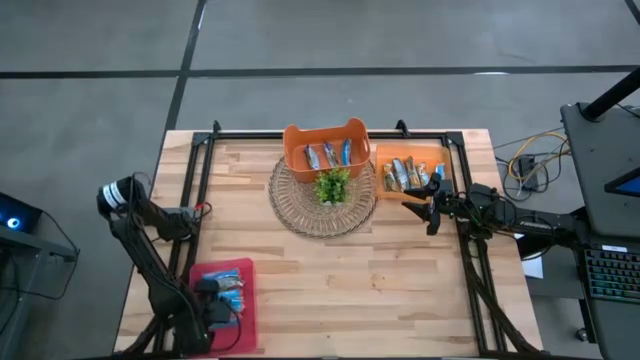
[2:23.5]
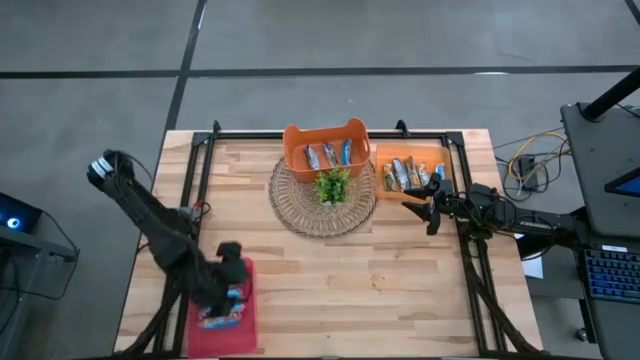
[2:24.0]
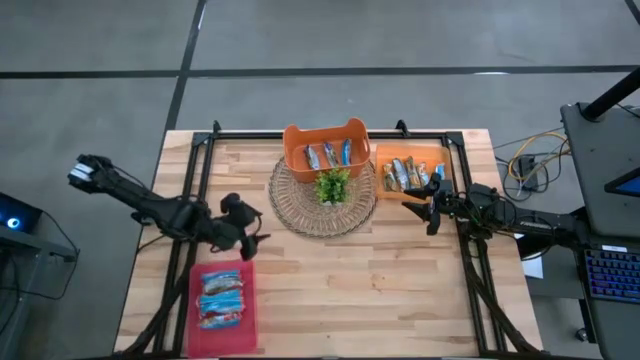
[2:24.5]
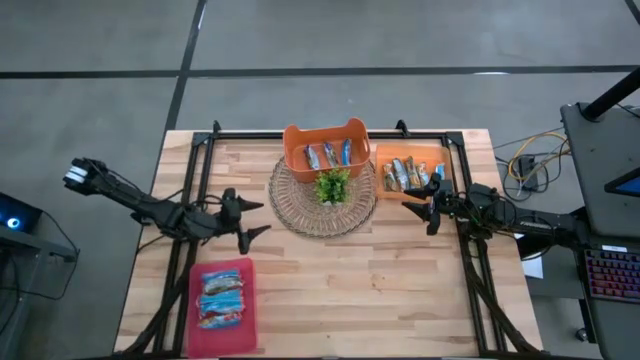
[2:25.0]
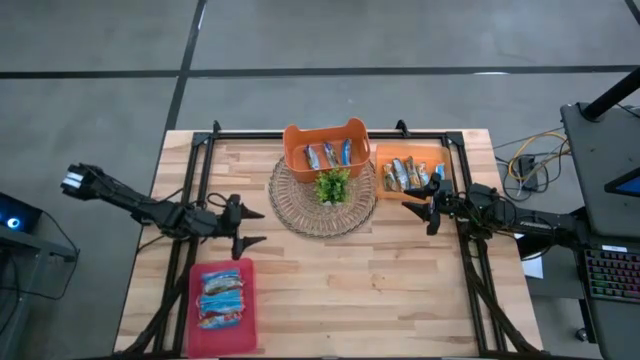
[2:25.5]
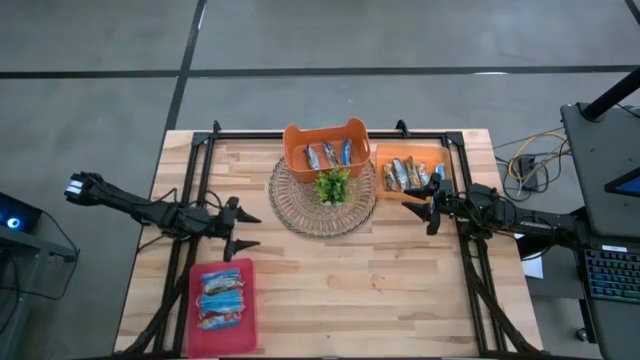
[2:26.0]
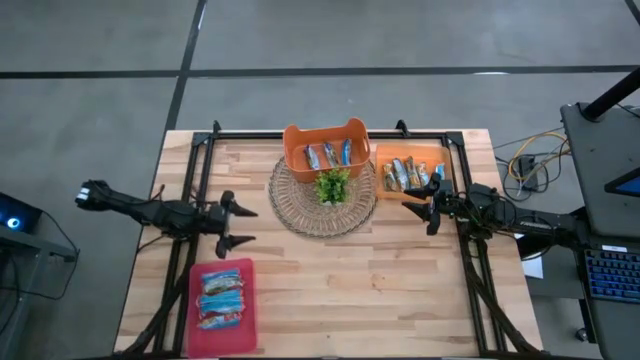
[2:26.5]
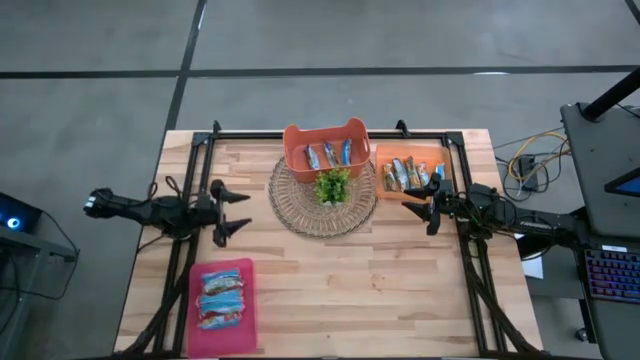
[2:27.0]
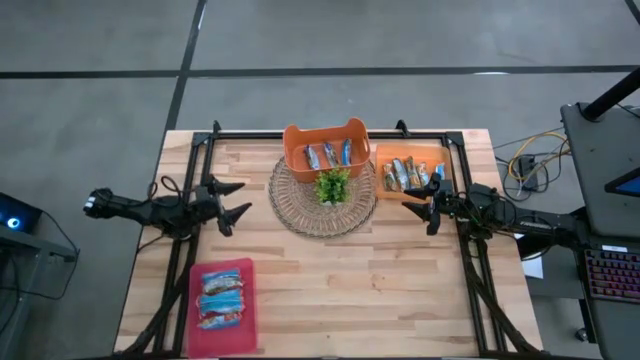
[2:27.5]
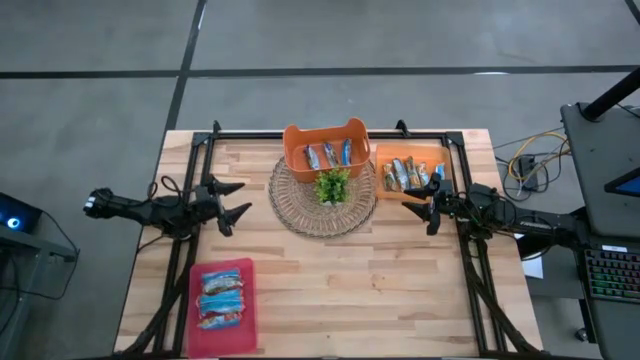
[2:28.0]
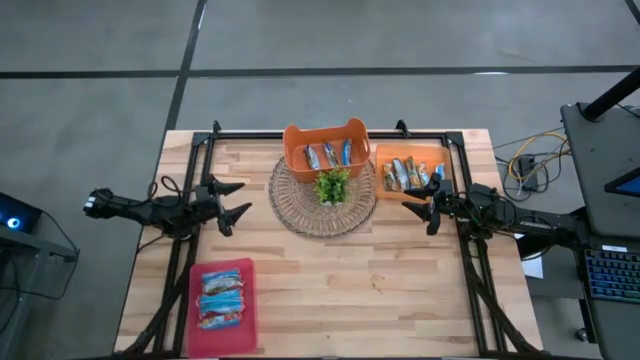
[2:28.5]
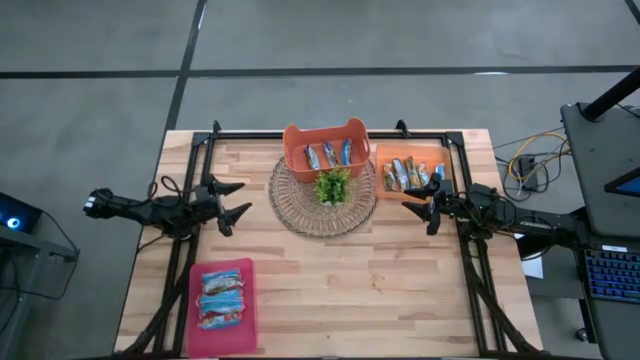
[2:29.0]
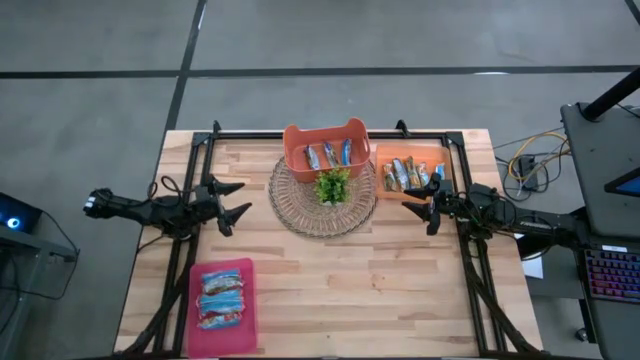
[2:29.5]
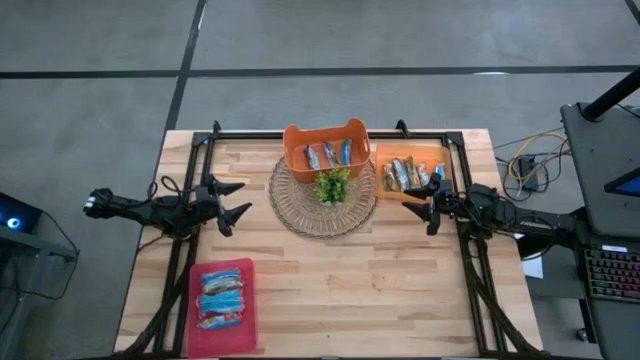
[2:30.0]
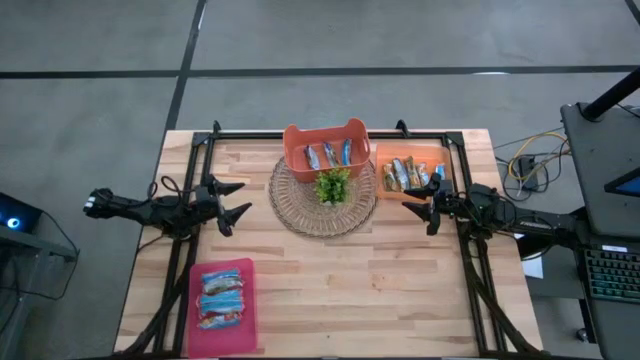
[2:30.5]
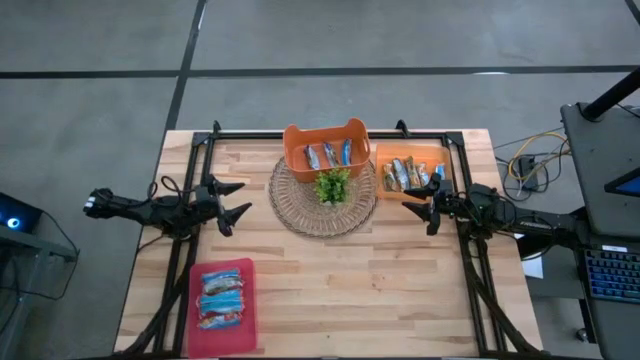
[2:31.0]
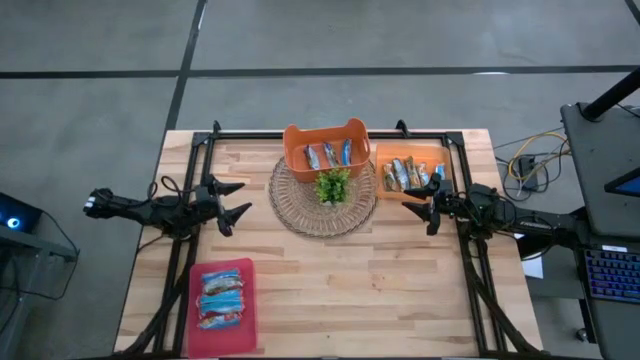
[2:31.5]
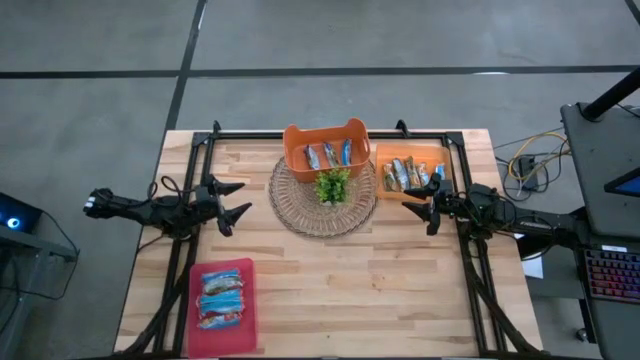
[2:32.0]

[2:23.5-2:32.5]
Task: Pick and place Granola Bars by type
Return to Home Position

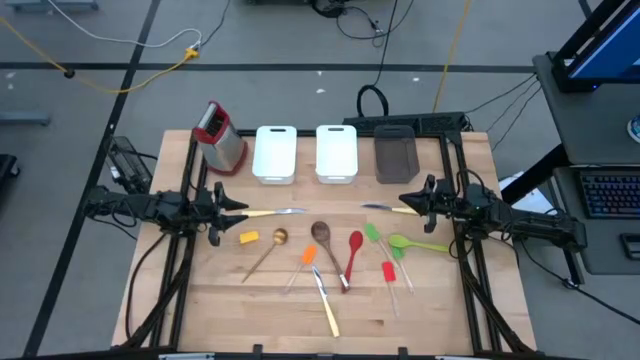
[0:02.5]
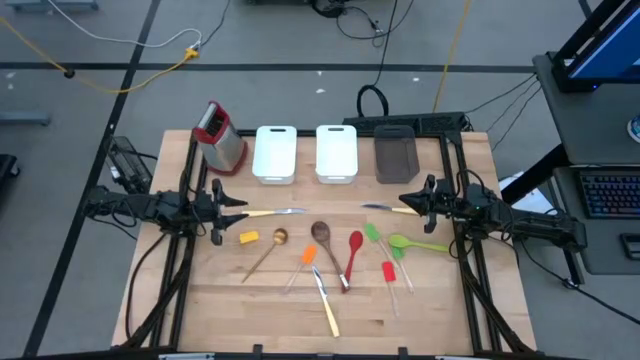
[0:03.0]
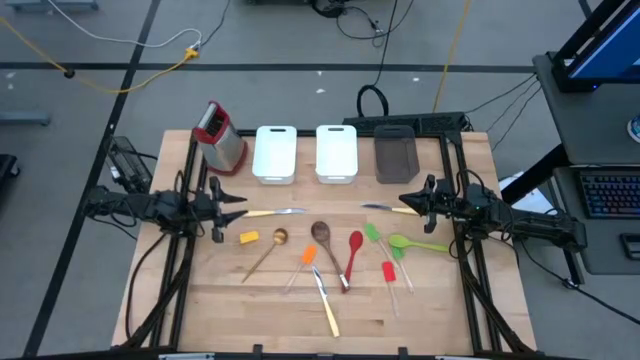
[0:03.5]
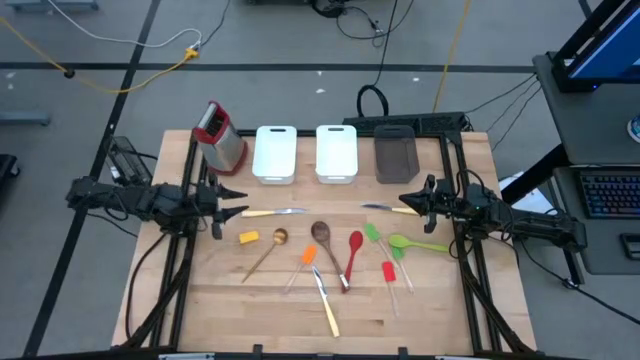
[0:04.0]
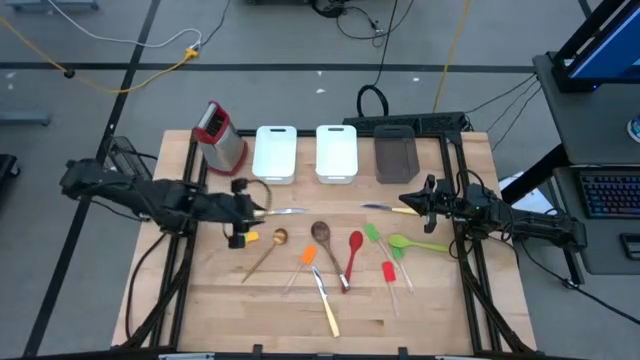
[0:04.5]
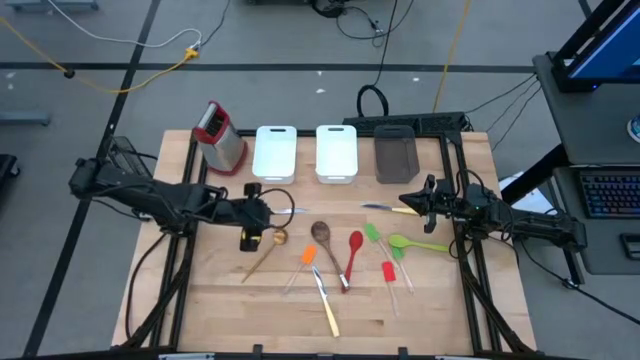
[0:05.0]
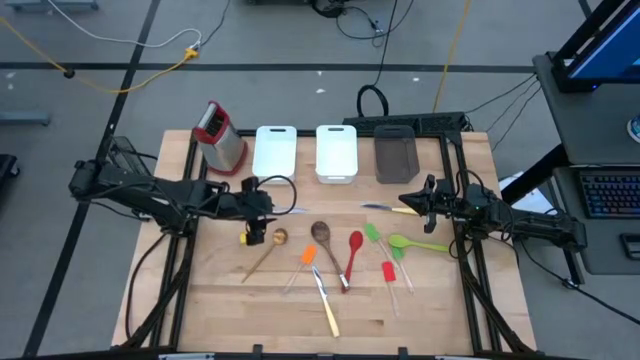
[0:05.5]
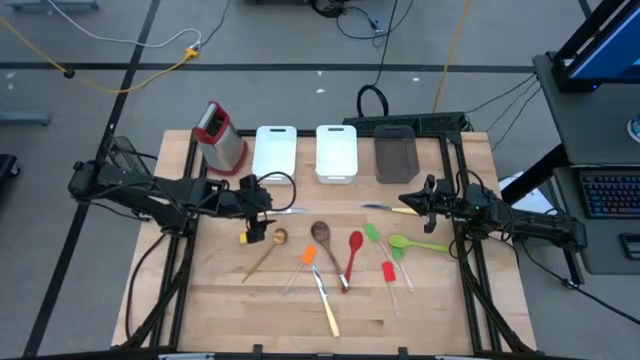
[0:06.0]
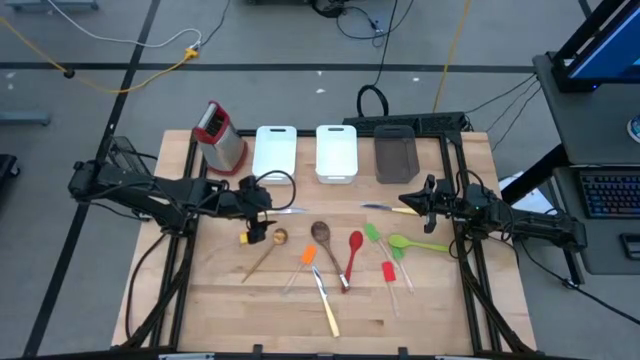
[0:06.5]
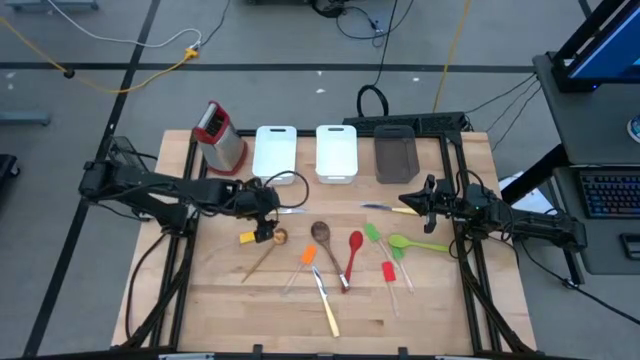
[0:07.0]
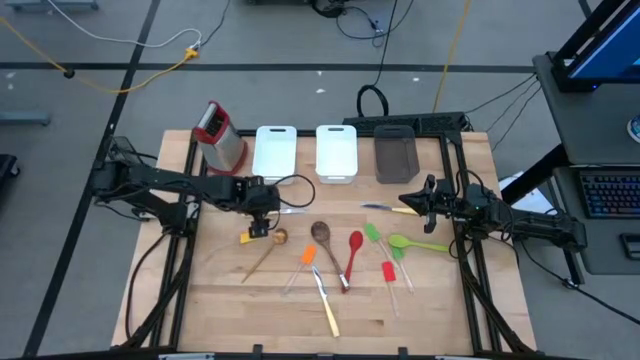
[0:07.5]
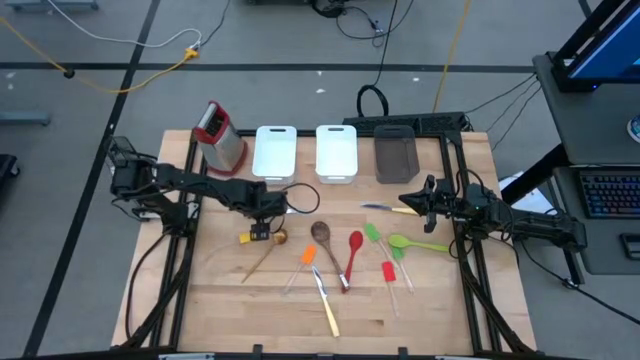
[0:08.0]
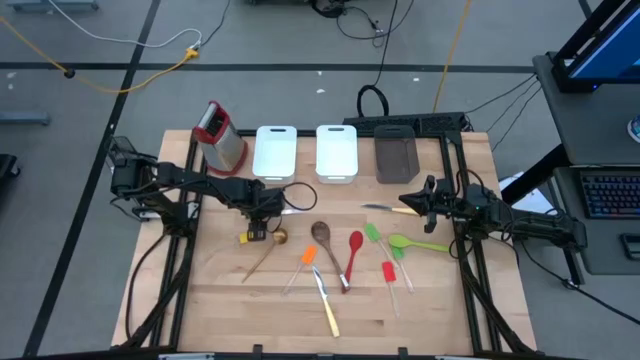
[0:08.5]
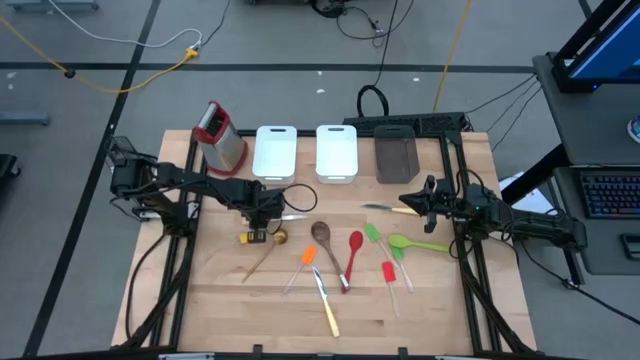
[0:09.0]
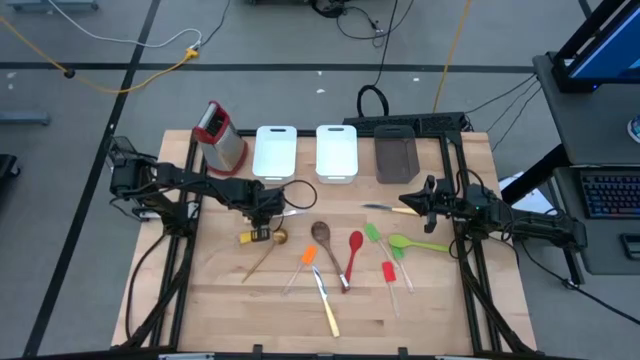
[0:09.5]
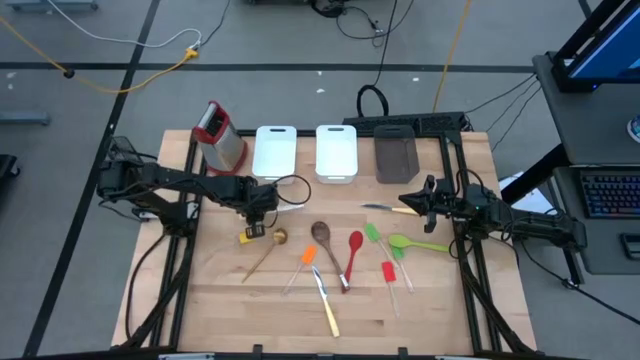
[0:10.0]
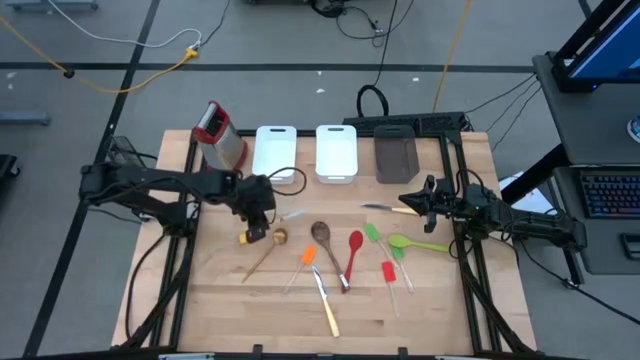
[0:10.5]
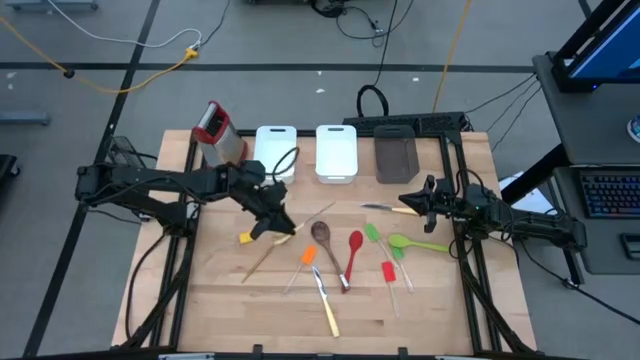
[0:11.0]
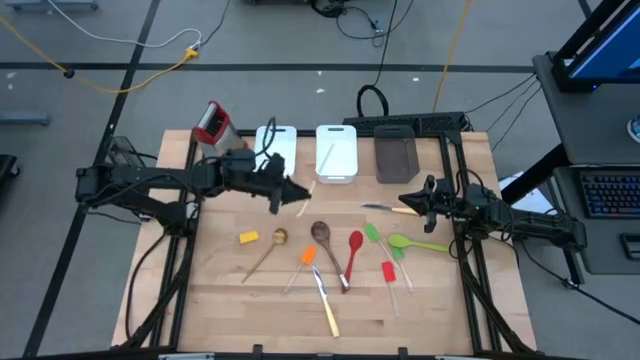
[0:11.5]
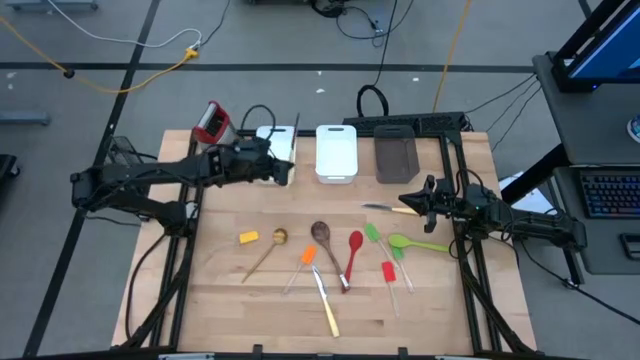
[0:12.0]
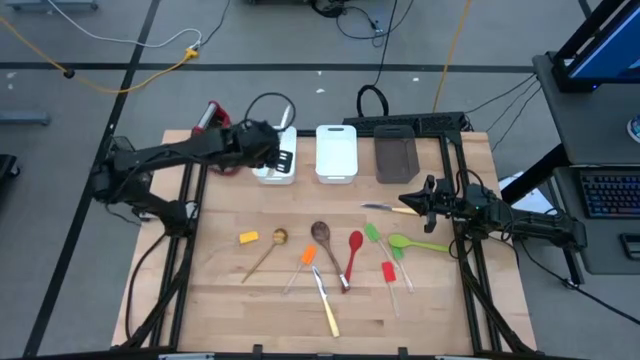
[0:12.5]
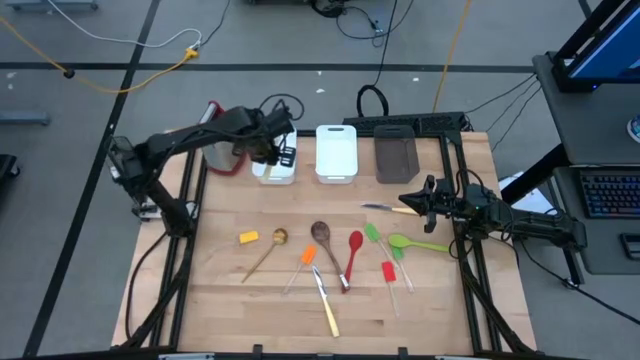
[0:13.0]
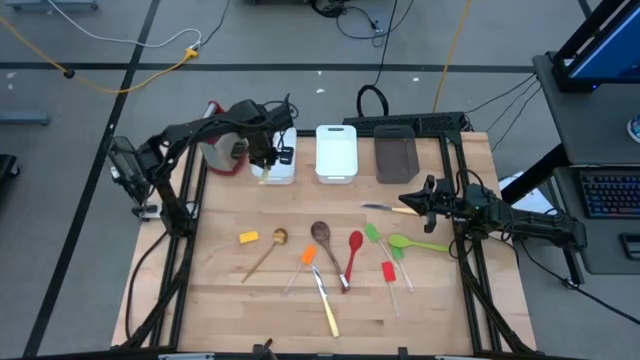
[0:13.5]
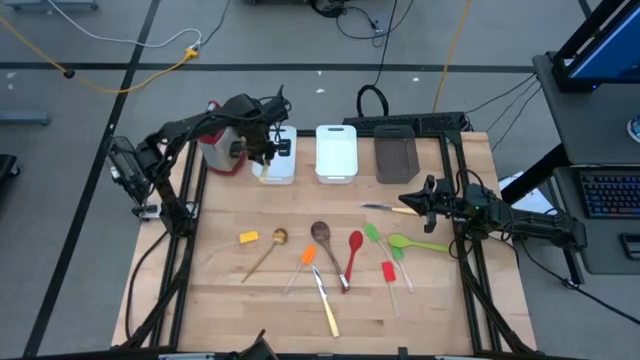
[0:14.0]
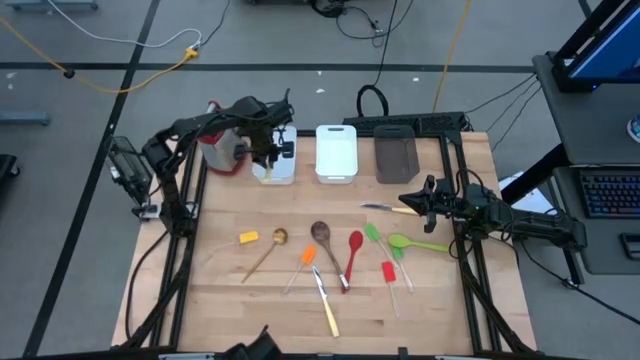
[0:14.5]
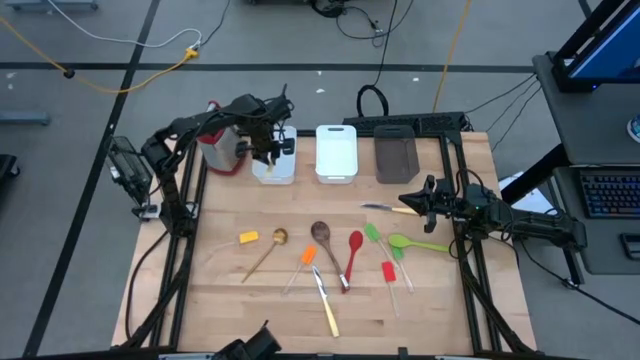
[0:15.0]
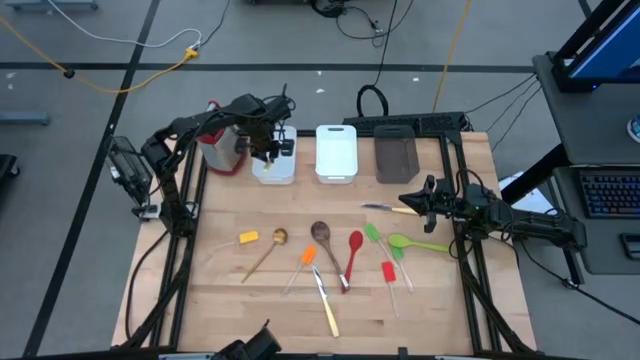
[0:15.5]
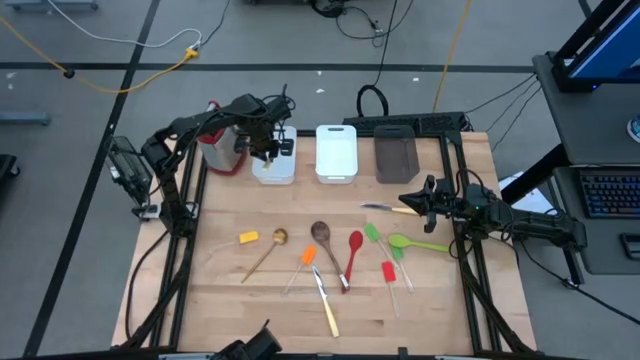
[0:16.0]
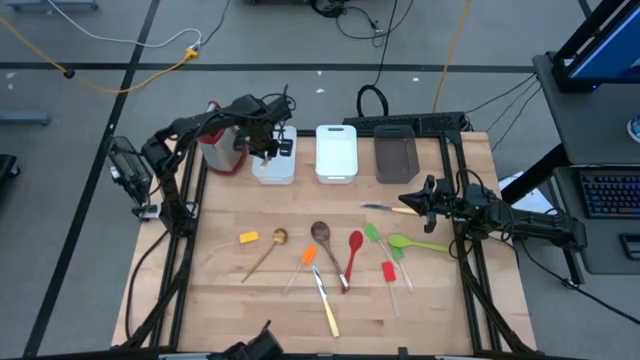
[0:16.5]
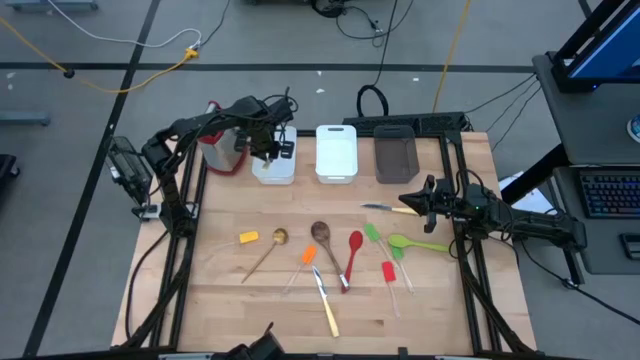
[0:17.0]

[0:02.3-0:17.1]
Task: Pick & Place Kitchen Items
Put the left yellow knife into the left white bin
